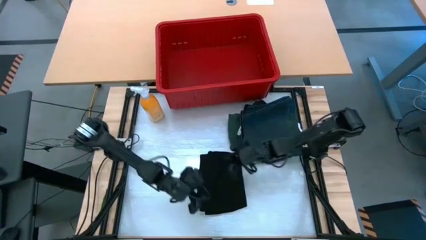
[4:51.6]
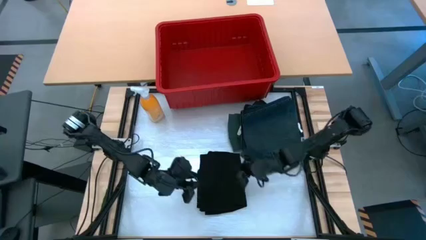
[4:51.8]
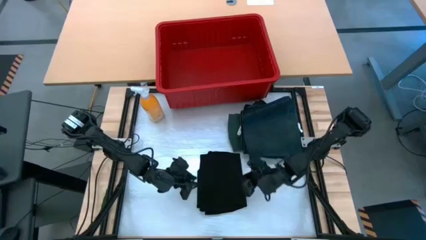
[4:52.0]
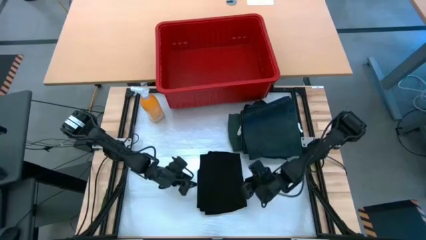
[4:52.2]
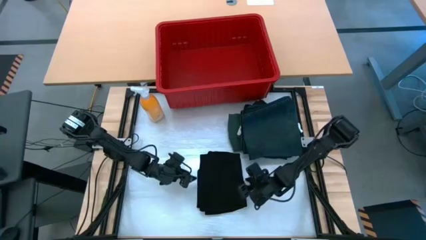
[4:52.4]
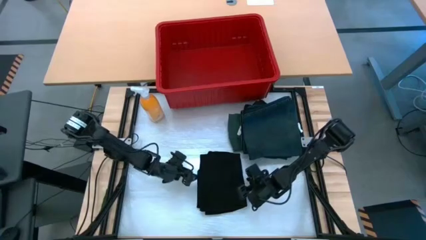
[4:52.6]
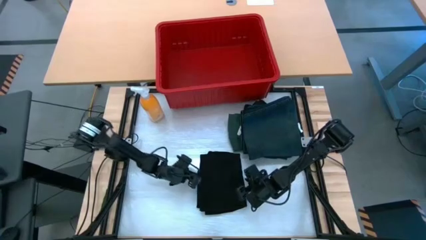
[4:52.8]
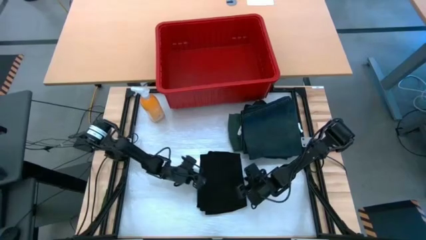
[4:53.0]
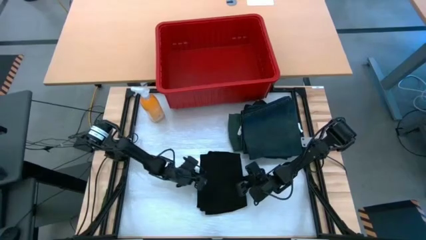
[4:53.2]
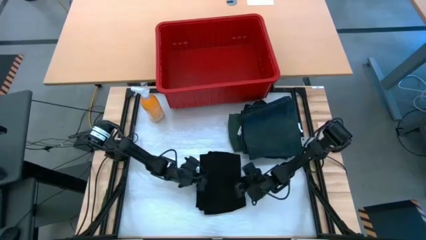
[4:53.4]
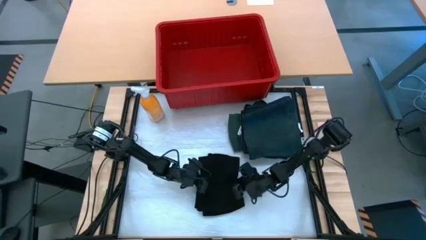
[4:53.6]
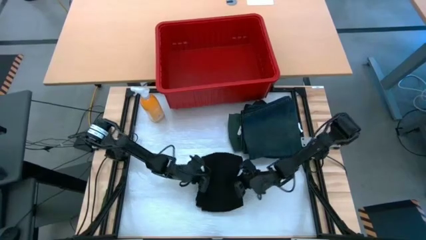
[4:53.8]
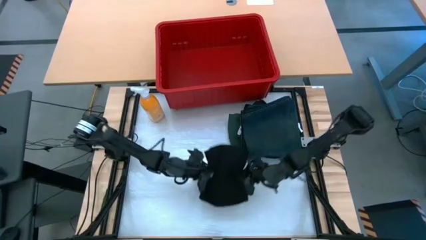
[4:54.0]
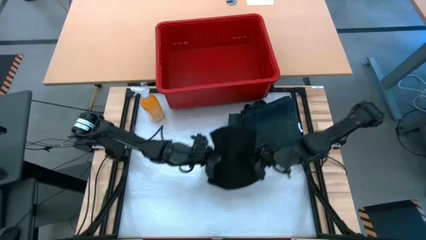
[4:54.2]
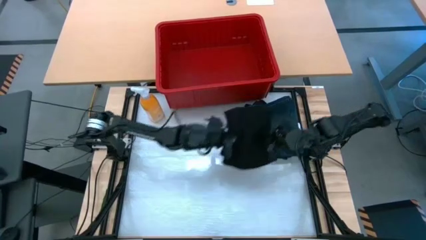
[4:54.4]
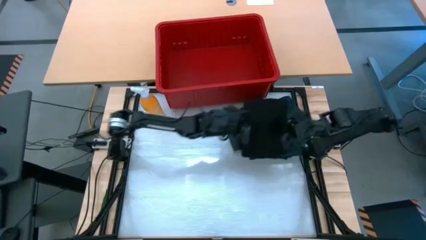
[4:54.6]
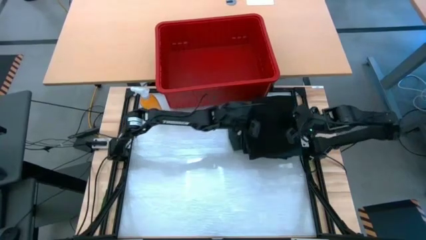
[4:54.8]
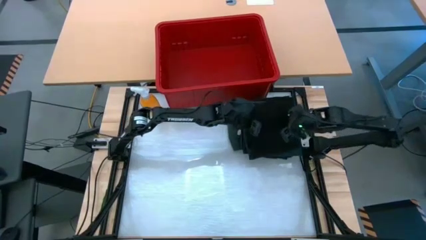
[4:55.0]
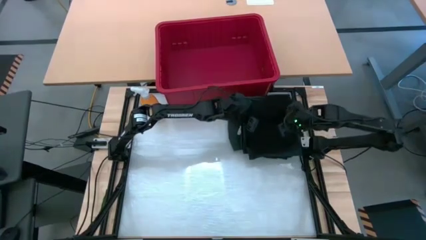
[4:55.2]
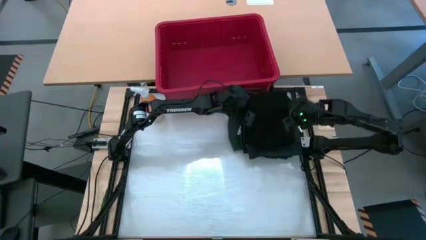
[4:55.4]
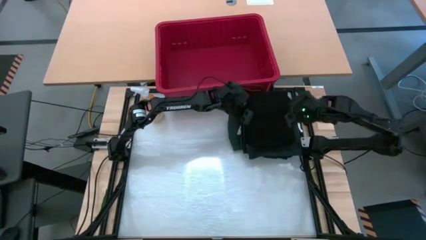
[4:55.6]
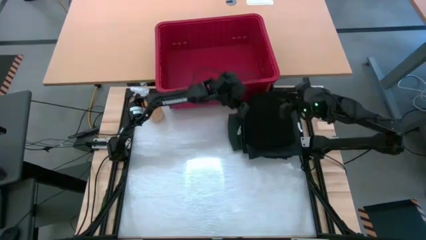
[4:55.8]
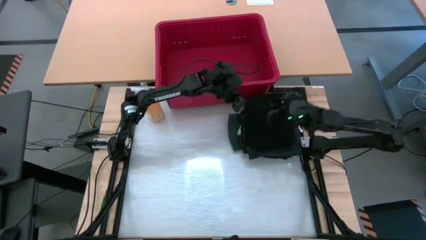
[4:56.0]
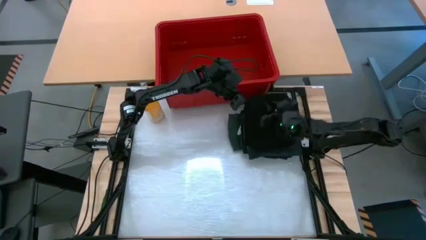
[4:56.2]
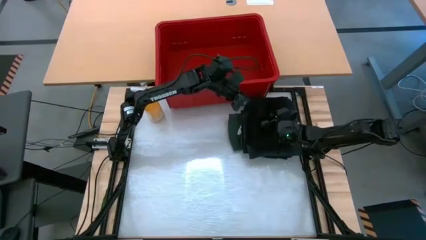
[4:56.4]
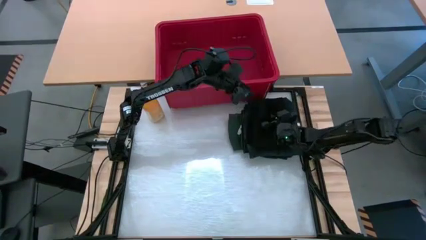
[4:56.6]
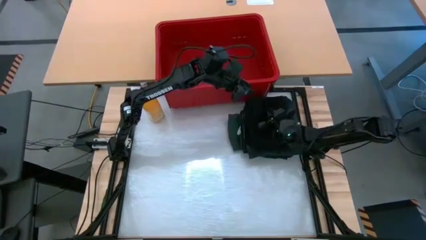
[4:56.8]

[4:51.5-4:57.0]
Task: Fold Laundry from Bin
Stack the black shirt on top of the blue pants

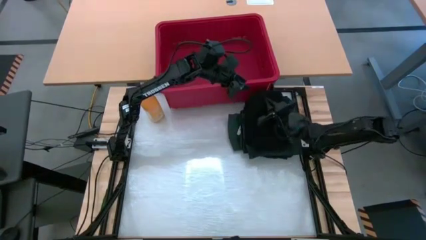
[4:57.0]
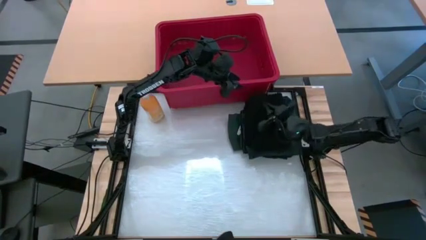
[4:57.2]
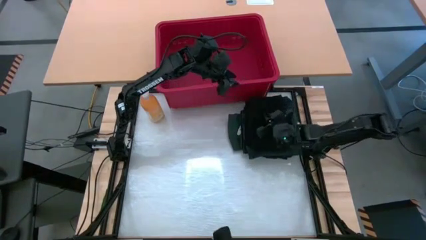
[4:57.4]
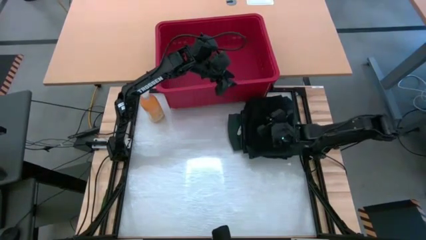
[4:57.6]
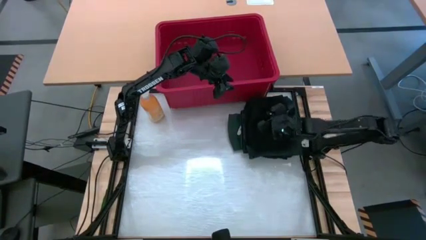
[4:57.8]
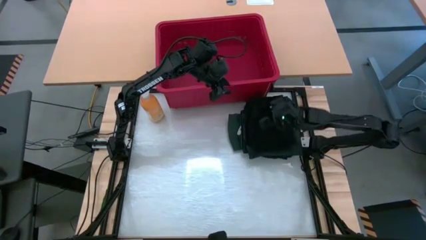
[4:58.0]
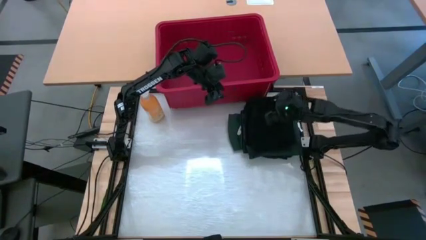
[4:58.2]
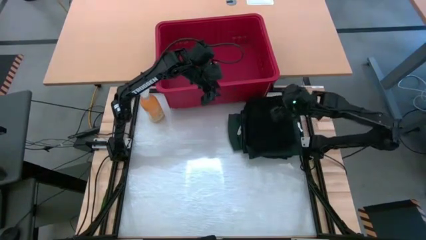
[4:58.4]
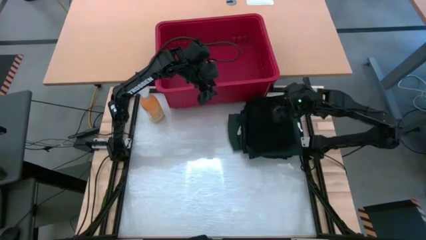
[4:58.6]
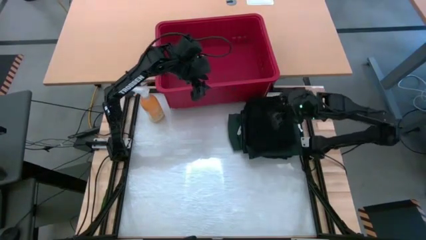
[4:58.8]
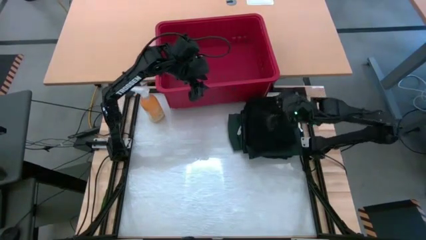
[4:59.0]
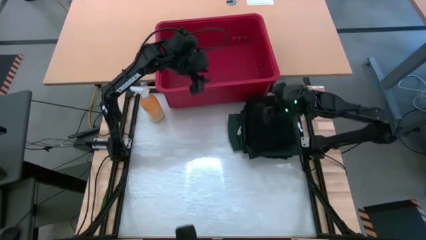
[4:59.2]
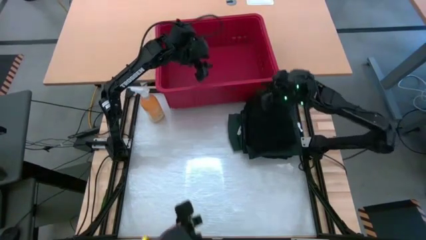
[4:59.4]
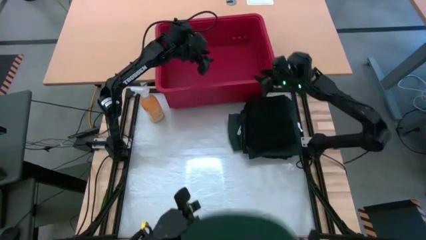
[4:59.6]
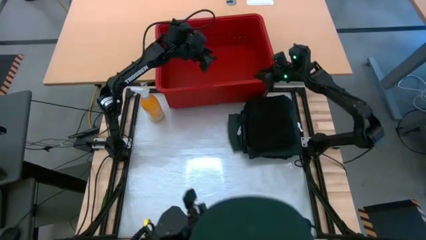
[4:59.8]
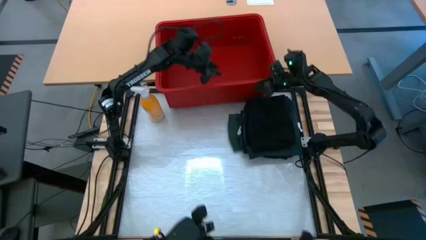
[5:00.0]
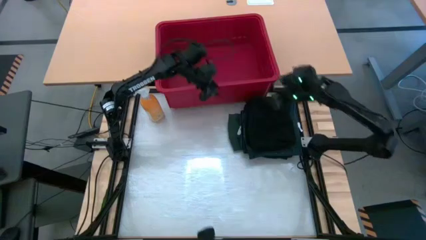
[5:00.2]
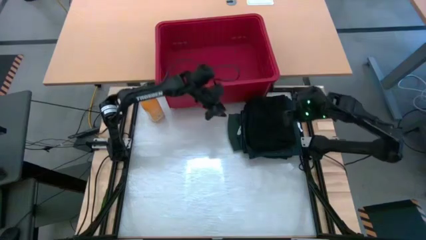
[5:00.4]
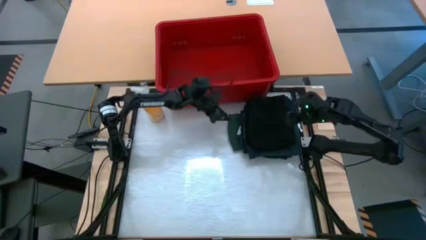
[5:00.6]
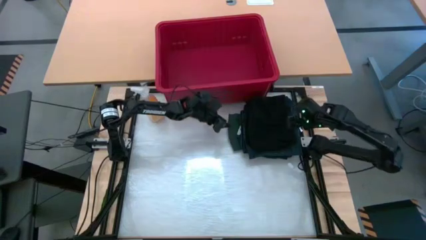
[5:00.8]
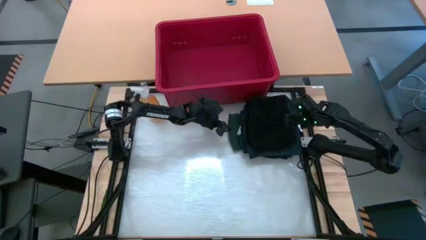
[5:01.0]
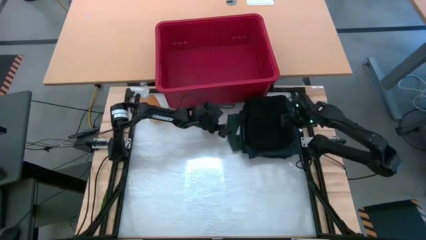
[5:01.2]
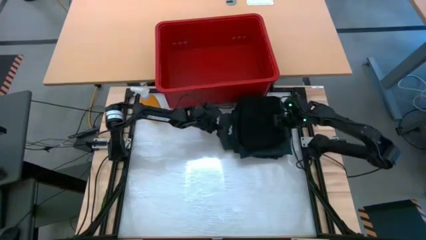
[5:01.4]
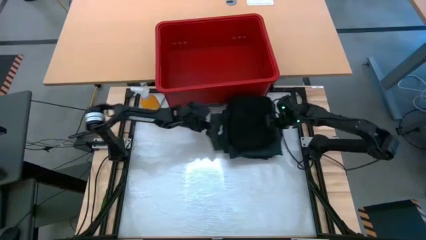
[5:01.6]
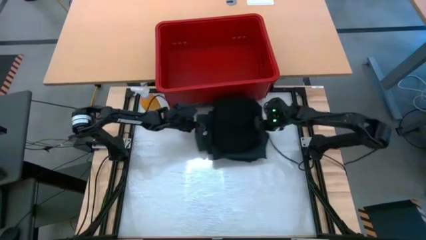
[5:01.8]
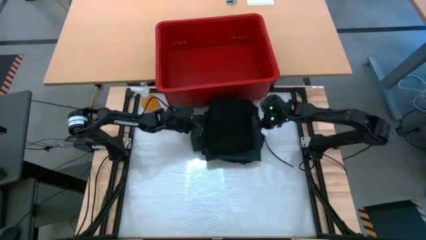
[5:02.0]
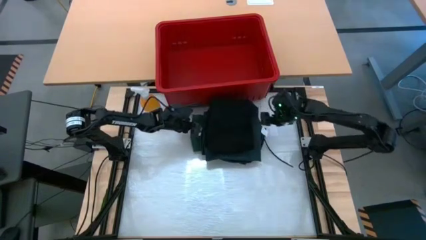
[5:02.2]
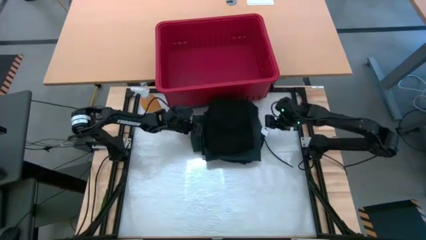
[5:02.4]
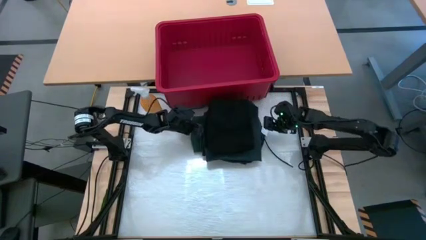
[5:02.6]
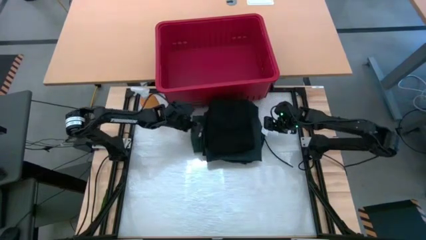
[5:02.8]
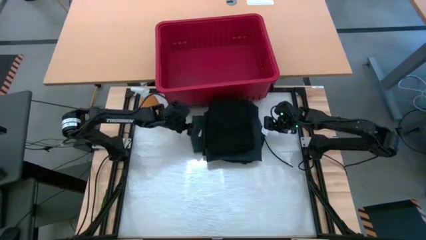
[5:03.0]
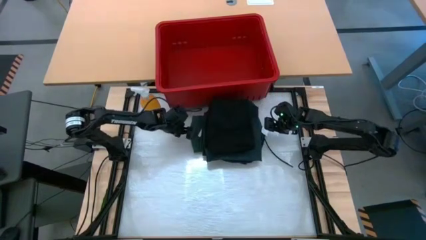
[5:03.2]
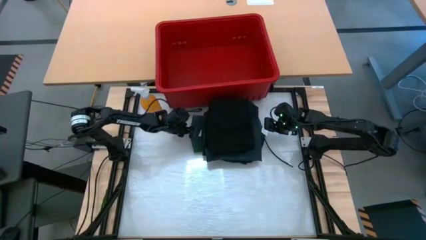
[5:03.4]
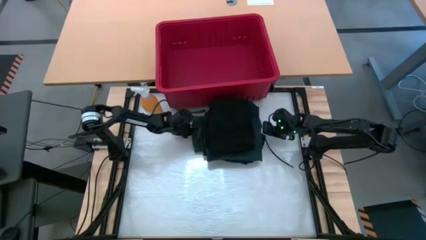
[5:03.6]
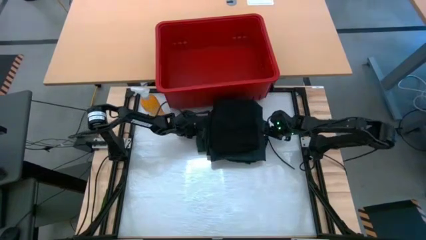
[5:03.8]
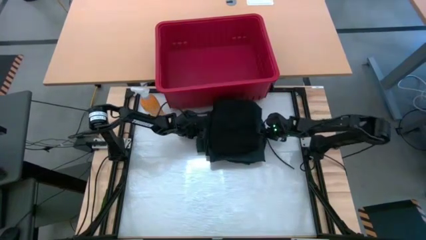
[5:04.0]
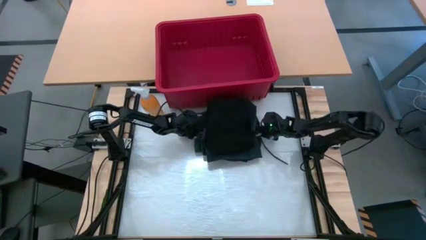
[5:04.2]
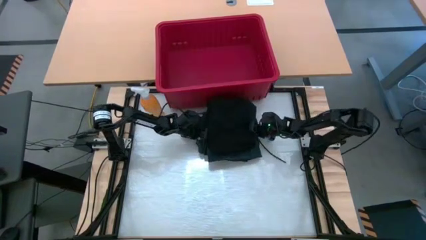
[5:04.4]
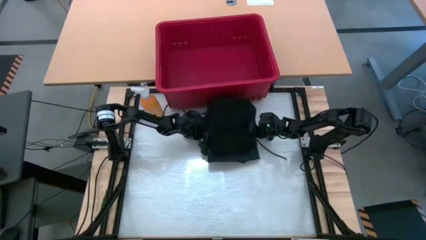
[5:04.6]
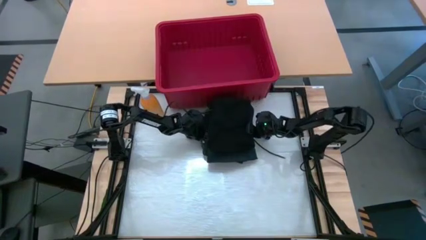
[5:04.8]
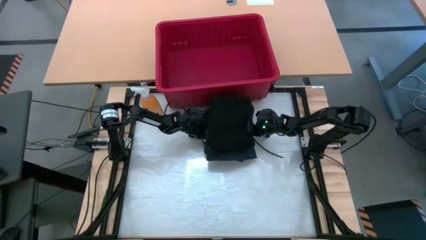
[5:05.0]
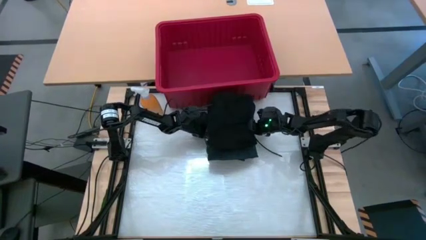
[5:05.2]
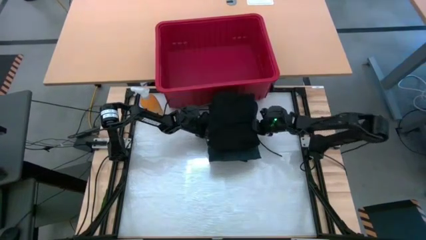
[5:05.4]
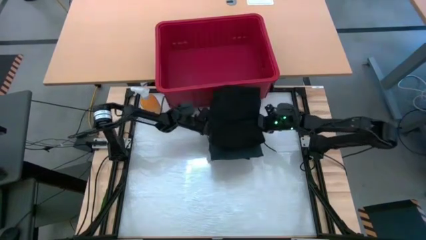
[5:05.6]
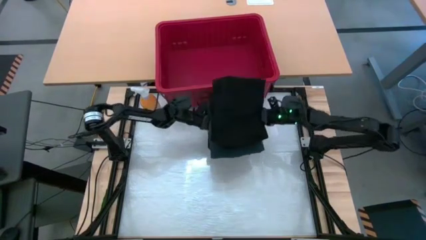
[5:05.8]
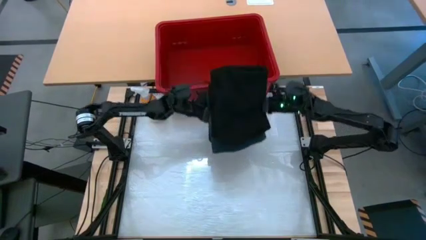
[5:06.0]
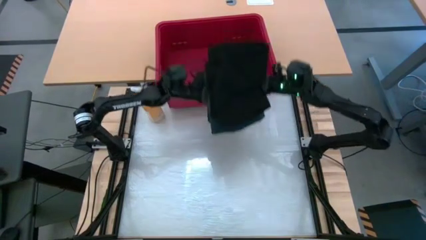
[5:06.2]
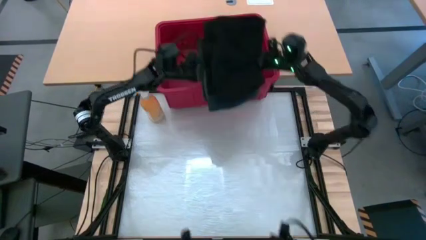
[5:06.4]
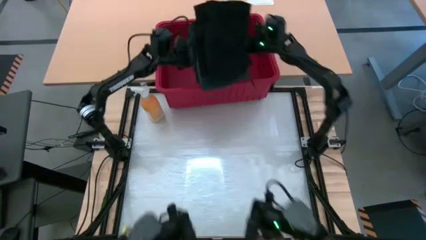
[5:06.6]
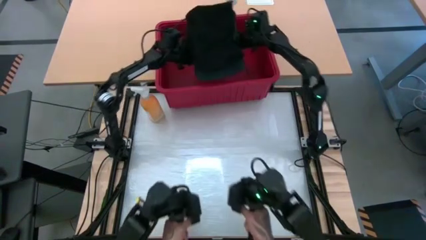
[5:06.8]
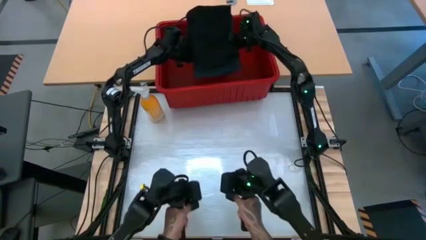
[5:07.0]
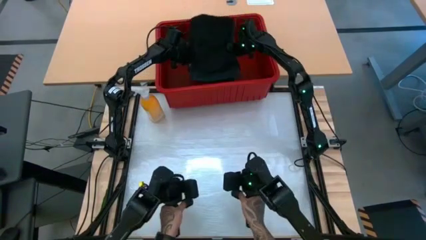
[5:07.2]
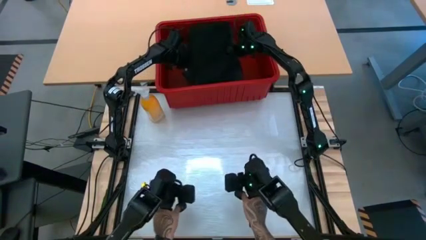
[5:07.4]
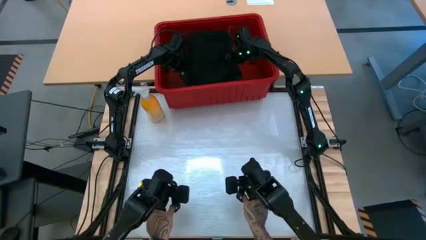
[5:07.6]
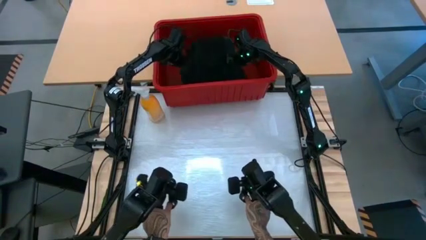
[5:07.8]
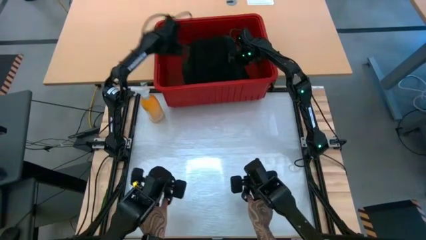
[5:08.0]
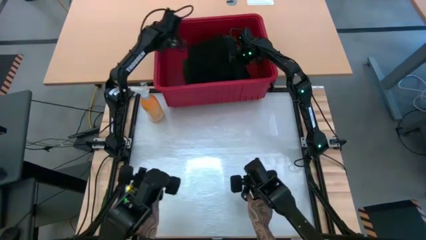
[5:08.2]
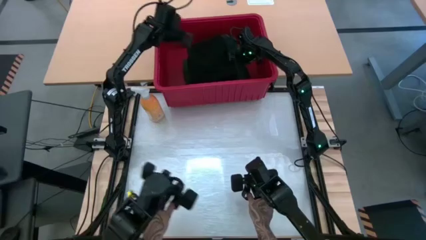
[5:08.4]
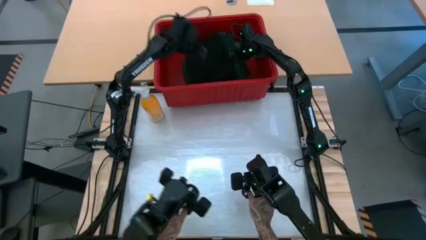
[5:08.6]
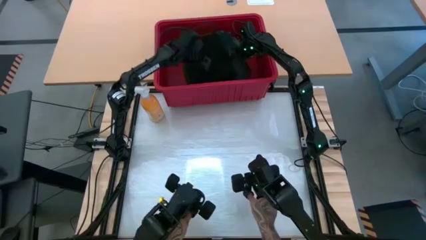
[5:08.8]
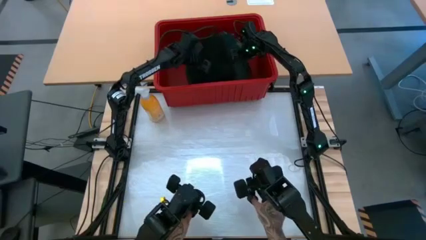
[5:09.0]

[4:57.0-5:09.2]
Put the folded clothes into the red laundry bin
